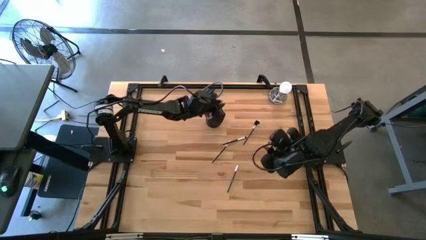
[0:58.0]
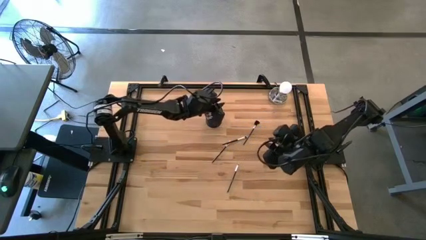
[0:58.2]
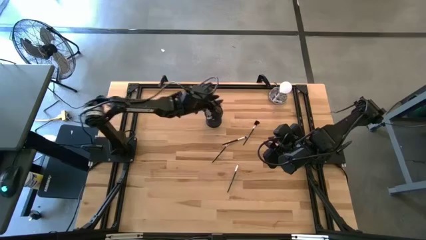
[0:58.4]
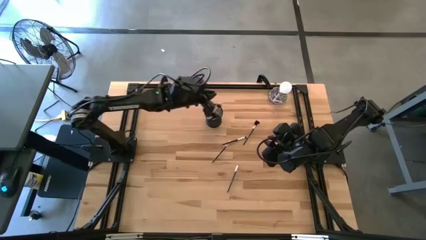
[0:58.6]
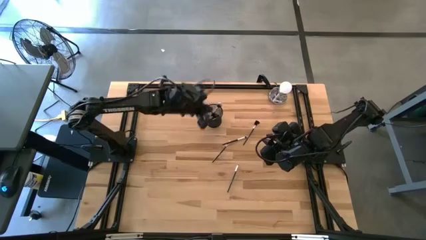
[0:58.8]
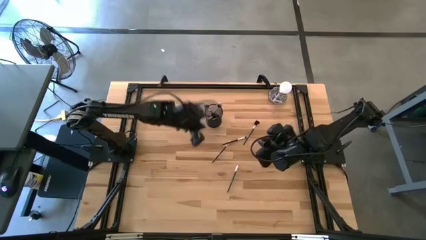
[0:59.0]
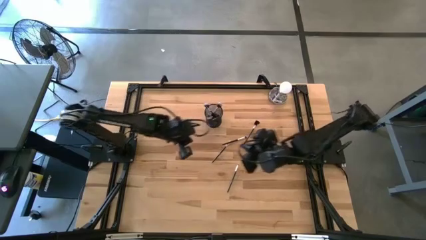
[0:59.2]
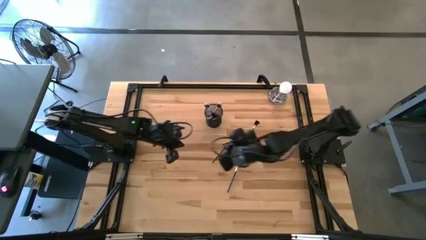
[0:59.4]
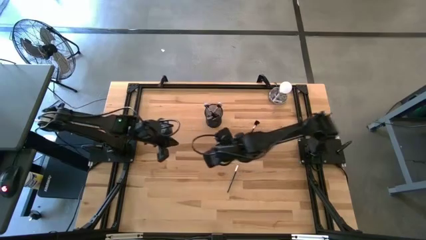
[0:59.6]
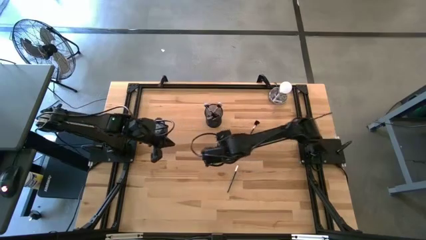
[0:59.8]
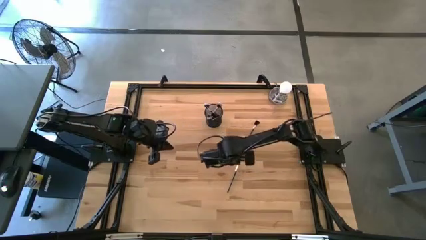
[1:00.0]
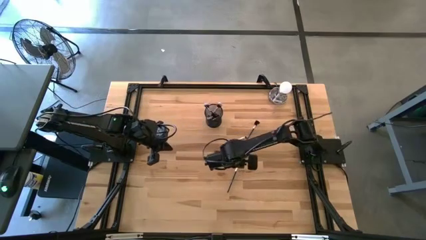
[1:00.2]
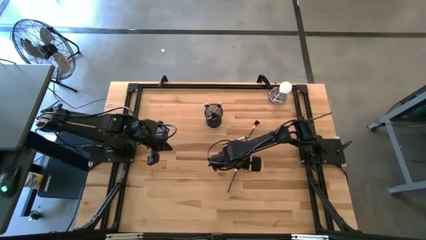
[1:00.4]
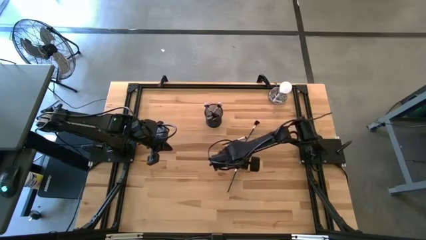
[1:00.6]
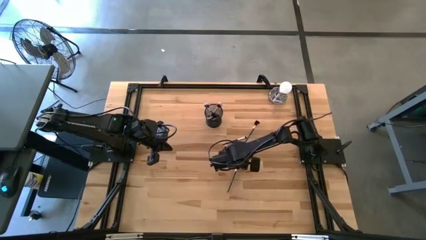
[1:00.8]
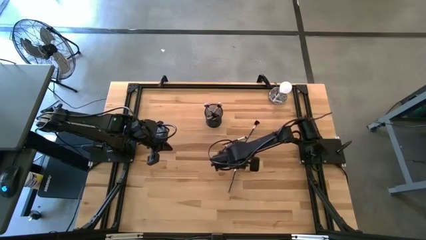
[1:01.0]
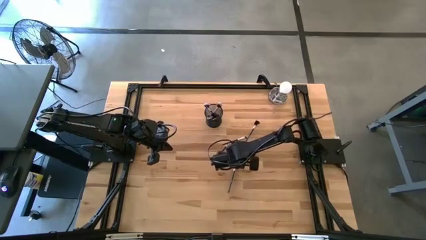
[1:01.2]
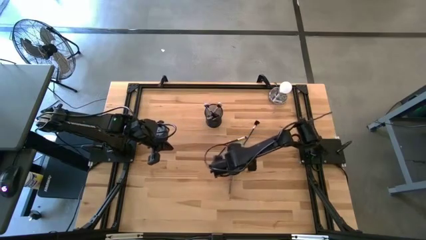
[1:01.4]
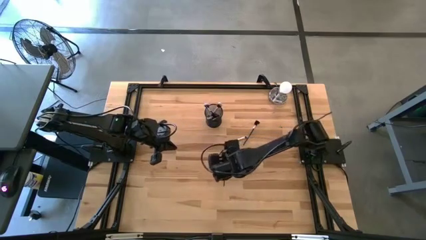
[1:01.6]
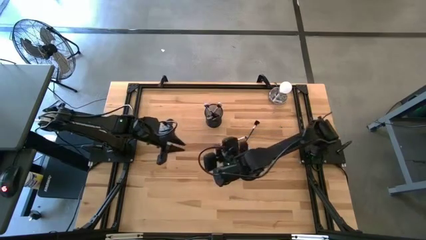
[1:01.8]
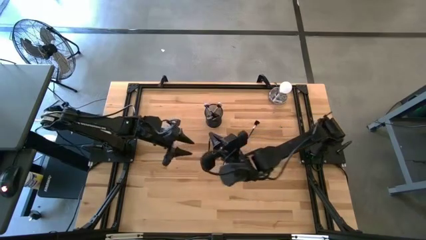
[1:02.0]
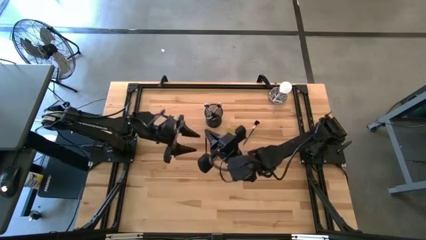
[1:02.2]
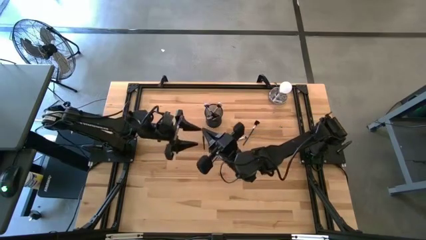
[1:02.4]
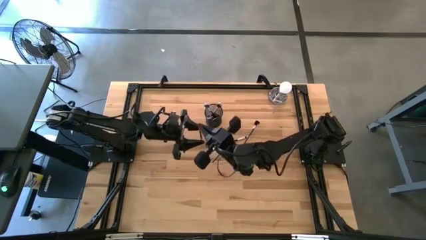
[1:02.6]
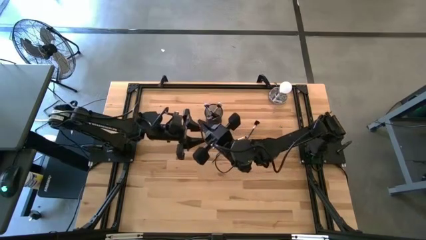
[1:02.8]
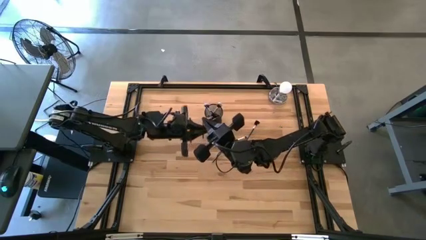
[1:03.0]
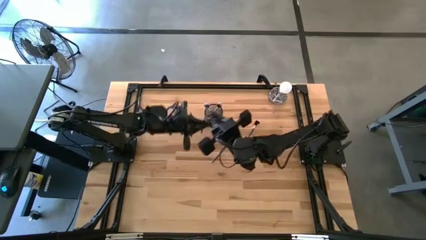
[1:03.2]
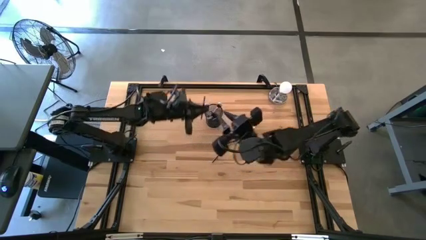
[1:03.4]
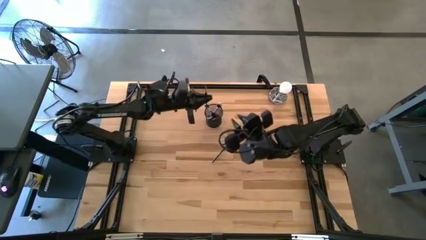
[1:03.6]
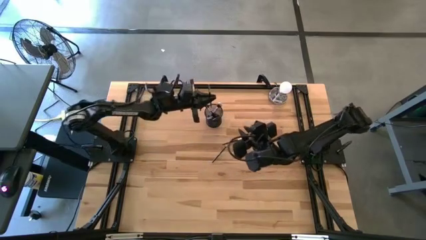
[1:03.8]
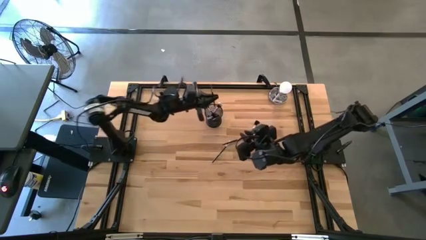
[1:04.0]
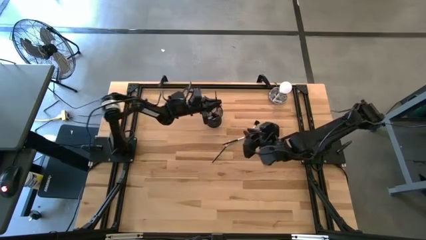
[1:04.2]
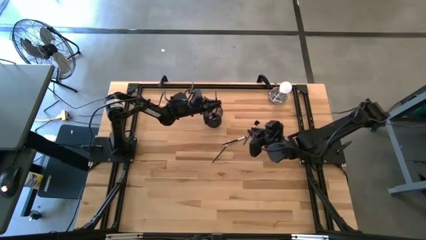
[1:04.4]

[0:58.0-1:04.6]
Task: Pick & Place Makeup Brushes
Put the small white make-up brush into the black container

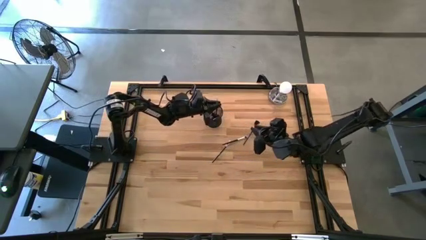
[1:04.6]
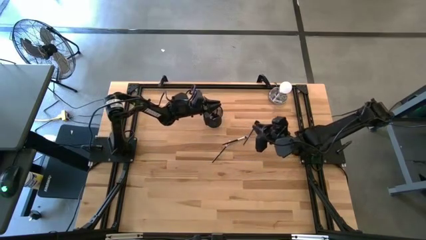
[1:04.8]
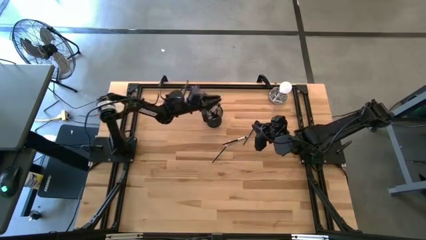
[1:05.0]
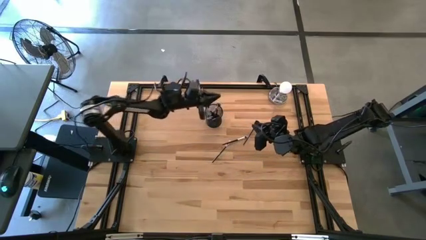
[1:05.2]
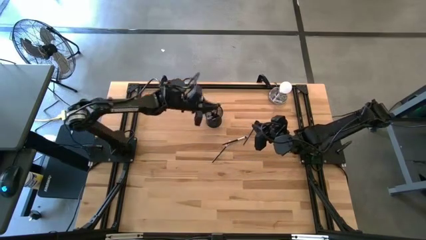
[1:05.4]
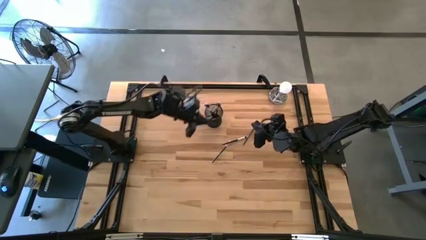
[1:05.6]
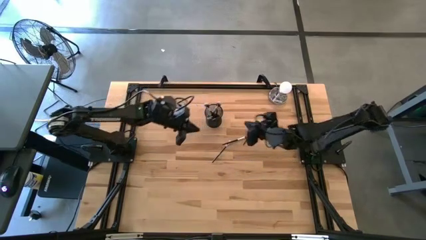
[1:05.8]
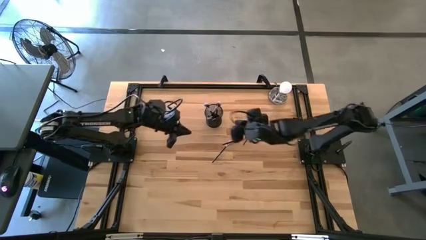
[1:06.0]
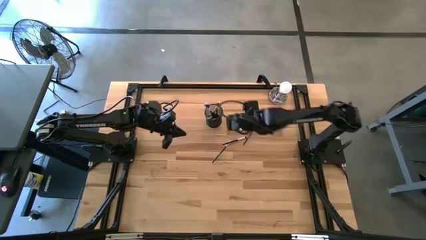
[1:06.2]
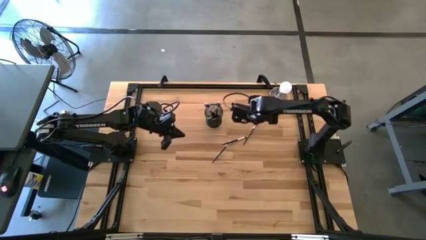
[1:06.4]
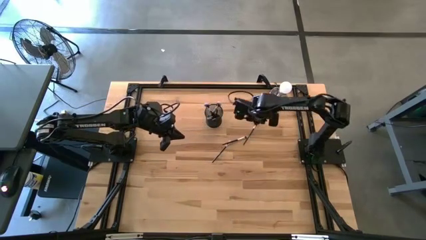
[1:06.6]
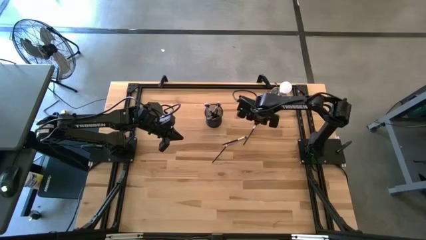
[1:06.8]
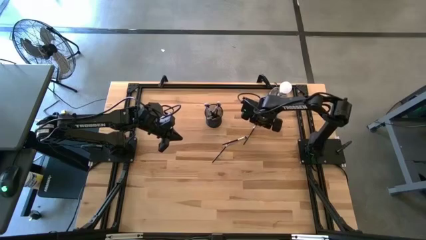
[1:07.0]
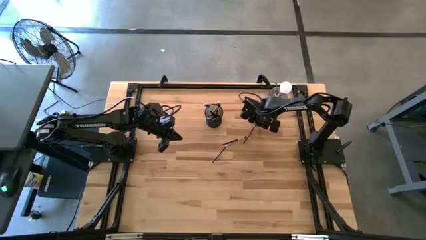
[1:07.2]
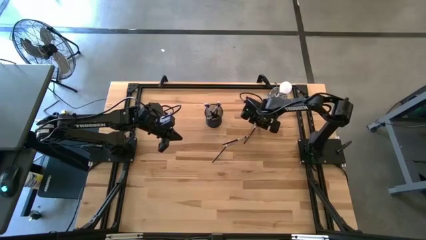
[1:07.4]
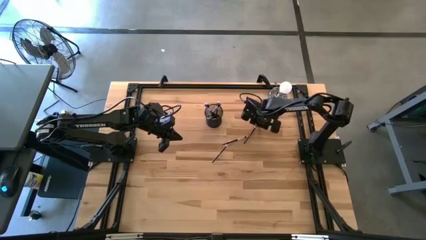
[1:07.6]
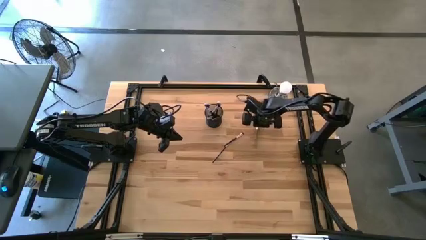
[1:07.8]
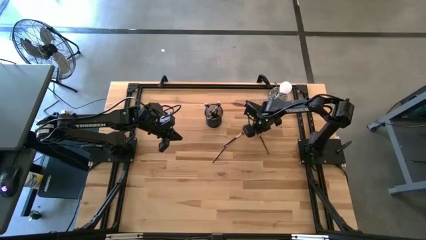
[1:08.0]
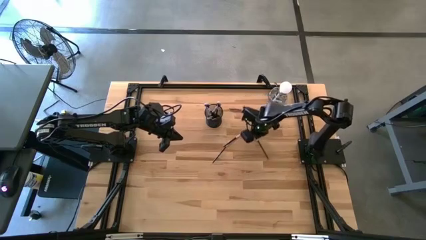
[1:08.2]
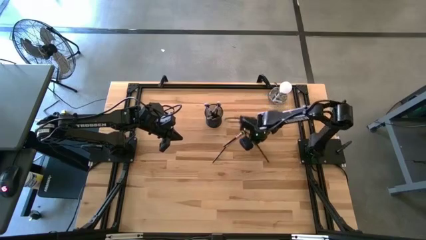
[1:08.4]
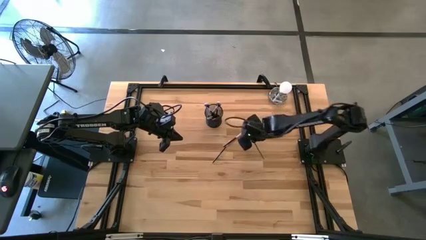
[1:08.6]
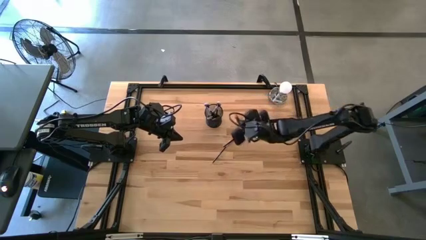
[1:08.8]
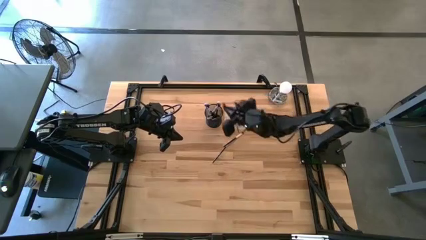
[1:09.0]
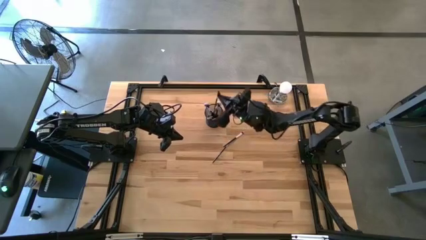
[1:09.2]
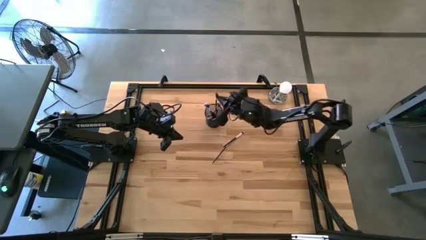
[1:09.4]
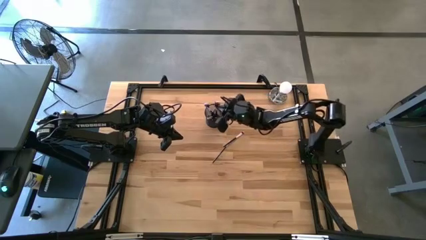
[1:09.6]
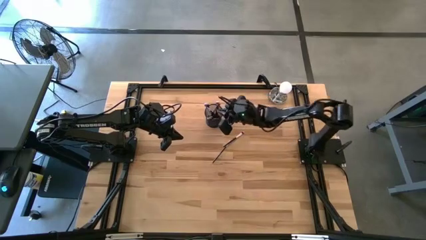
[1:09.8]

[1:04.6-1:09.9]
Put the large white make-up brush into the black container

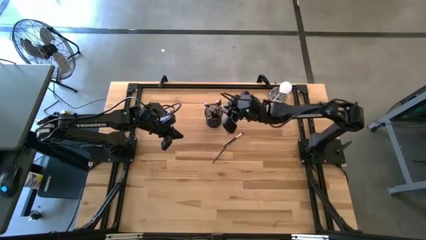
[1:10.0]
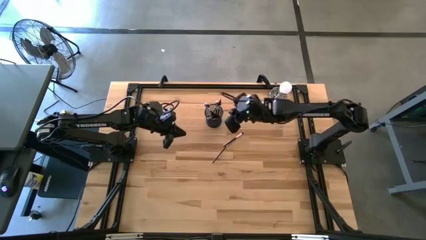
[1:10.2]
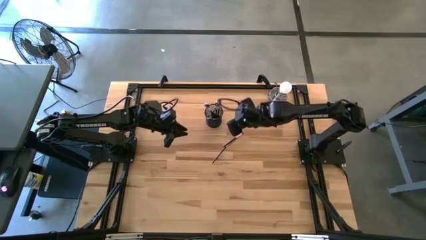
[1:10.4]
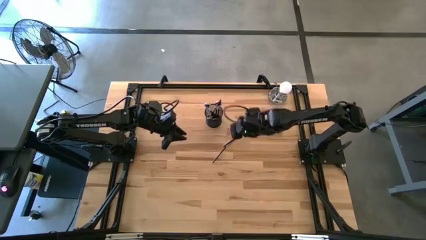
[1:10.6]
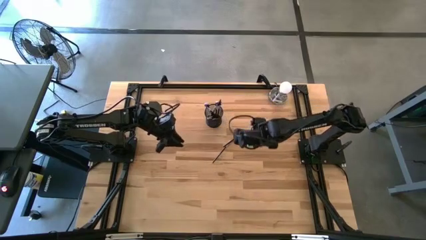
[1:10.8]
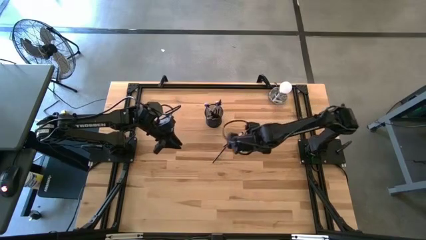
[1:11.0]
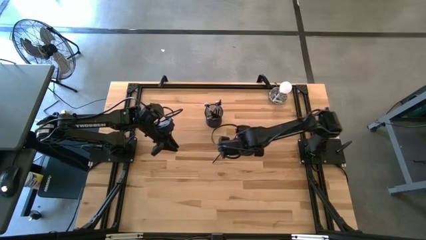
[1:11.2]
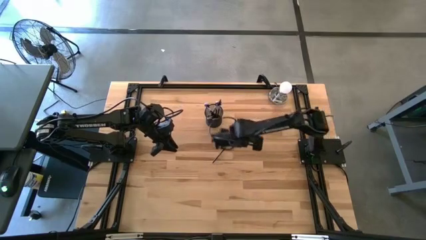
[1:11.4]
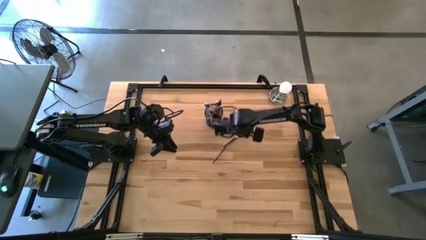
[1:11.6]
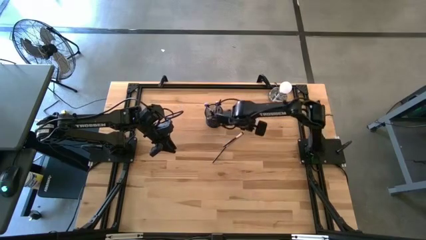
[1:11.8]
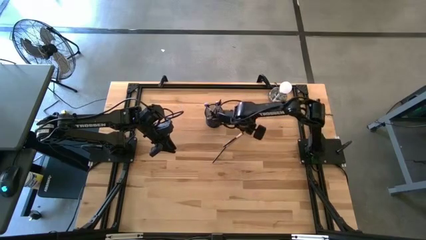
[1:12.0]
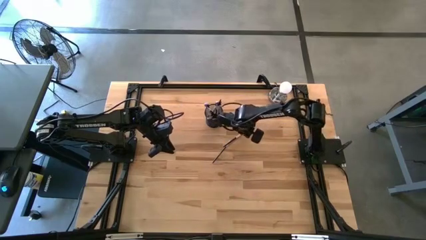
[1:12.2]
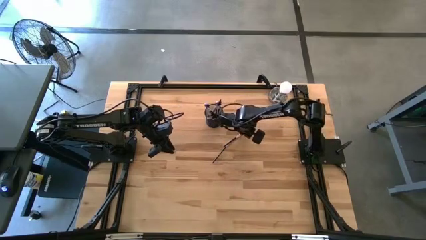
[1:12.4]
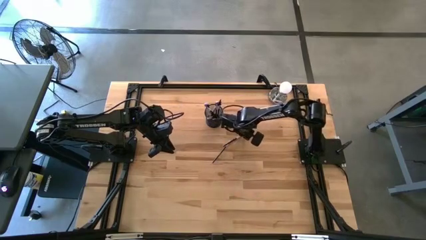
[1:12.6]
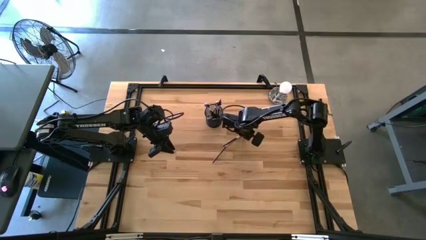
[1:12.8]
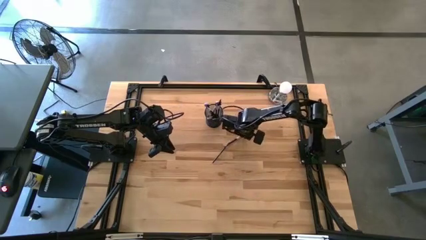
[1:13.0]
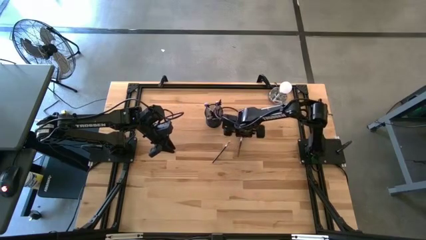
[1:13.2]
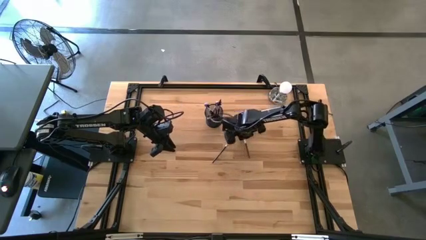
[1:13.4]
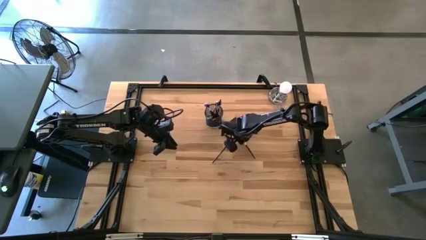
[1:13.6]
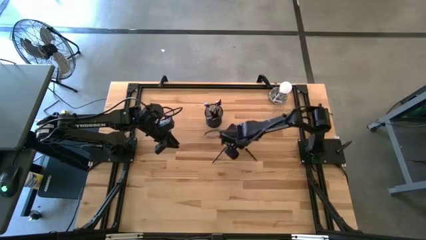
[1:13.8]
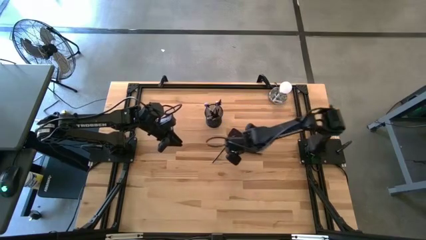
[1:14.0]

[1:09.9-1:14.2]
Put the small white make-up brush into the black container
